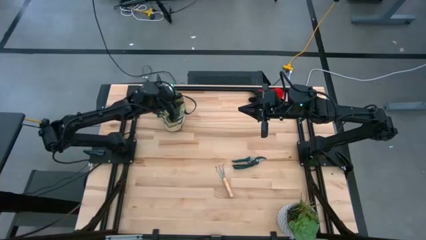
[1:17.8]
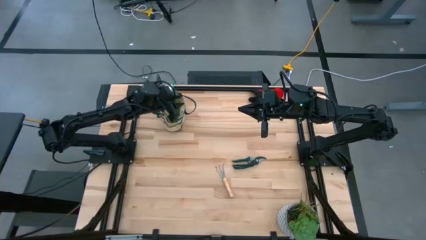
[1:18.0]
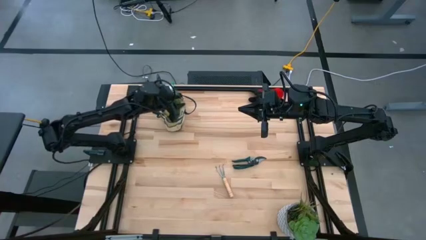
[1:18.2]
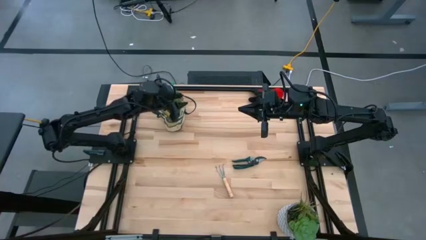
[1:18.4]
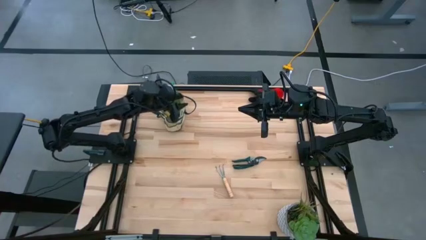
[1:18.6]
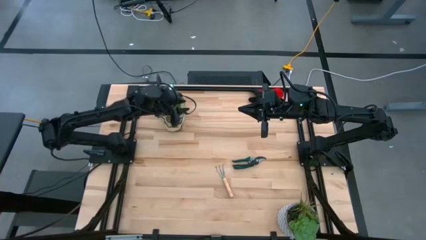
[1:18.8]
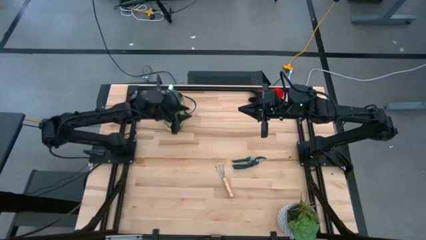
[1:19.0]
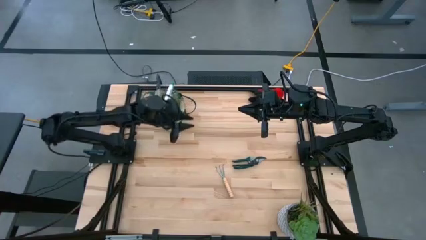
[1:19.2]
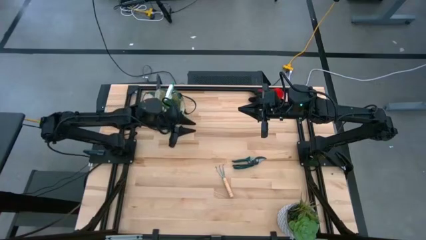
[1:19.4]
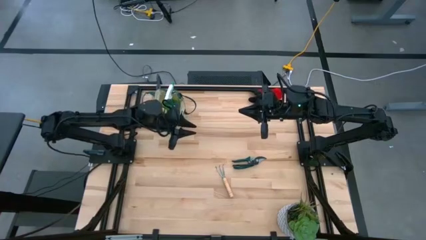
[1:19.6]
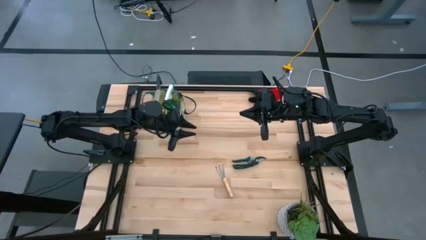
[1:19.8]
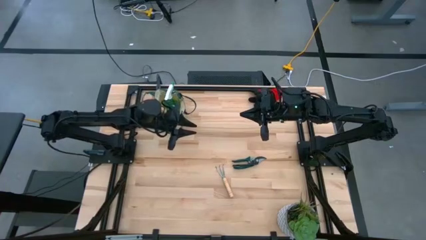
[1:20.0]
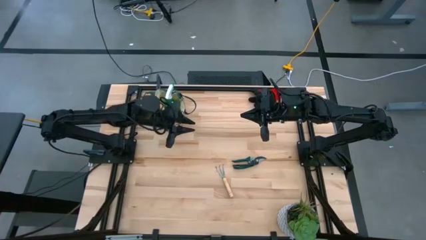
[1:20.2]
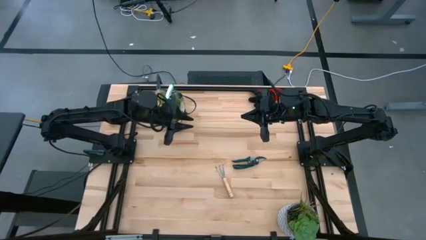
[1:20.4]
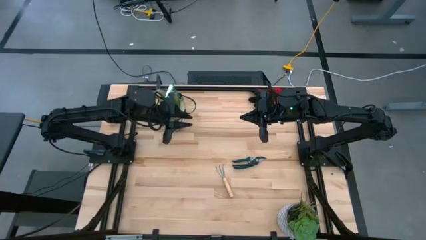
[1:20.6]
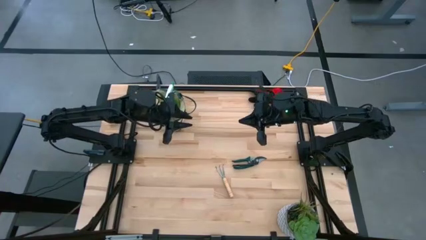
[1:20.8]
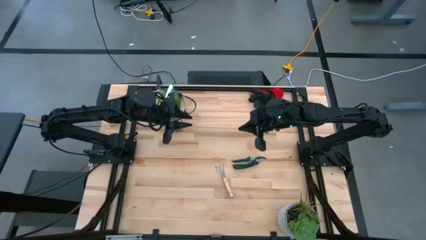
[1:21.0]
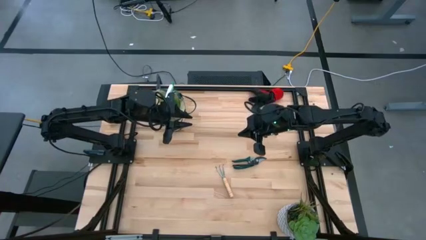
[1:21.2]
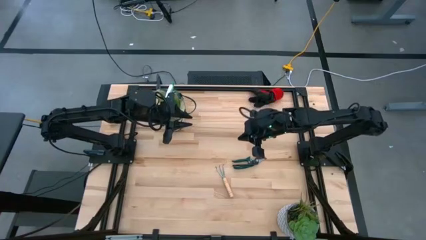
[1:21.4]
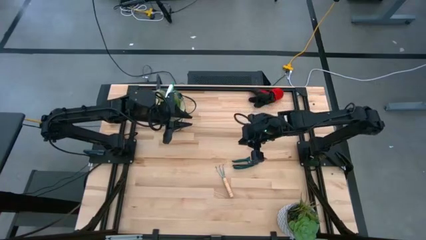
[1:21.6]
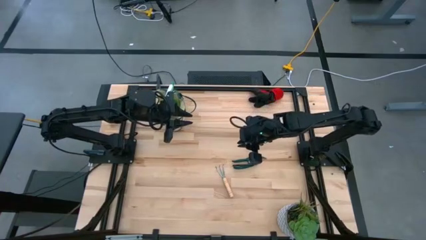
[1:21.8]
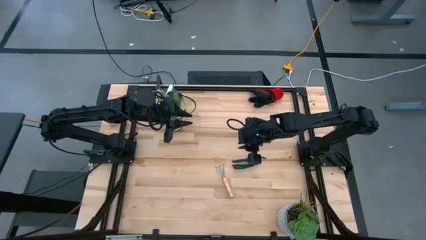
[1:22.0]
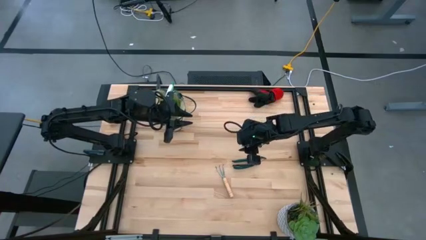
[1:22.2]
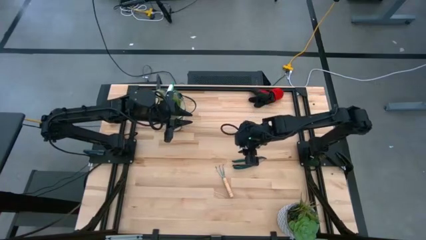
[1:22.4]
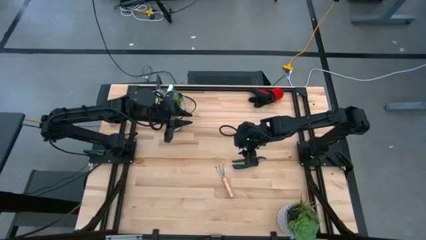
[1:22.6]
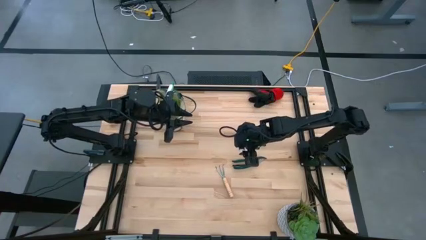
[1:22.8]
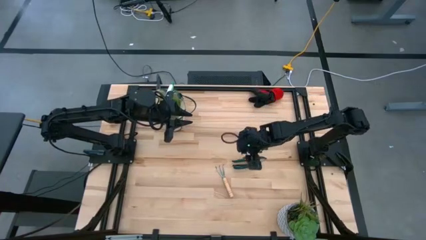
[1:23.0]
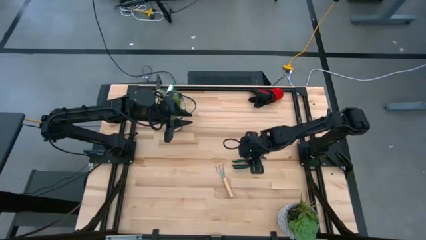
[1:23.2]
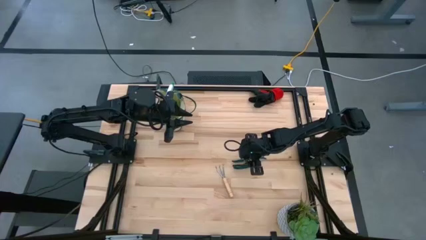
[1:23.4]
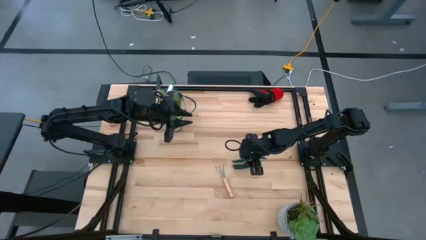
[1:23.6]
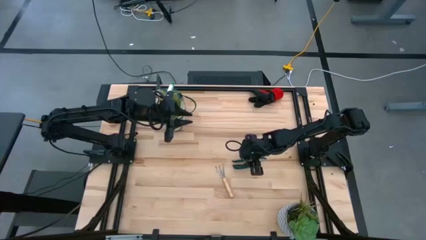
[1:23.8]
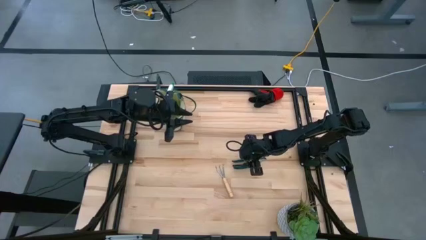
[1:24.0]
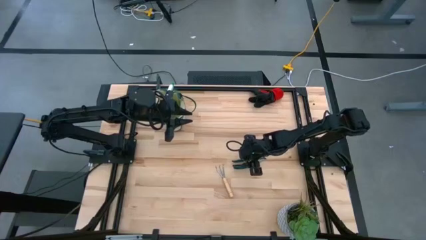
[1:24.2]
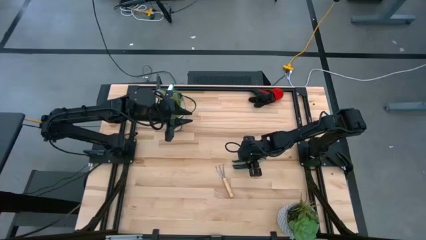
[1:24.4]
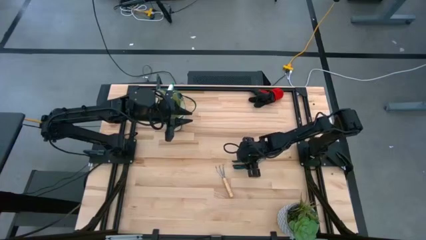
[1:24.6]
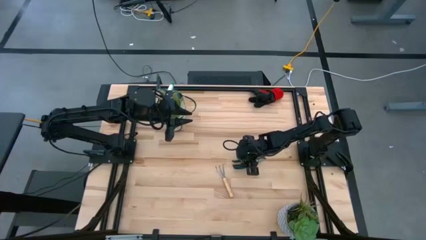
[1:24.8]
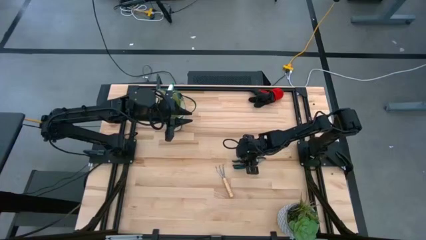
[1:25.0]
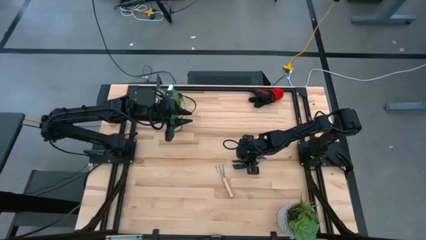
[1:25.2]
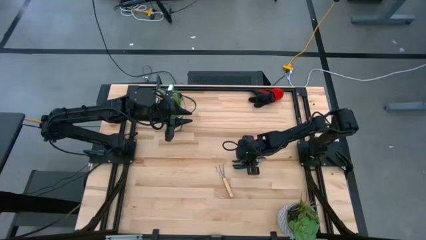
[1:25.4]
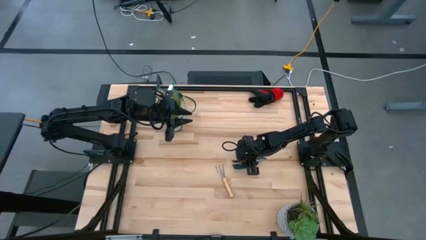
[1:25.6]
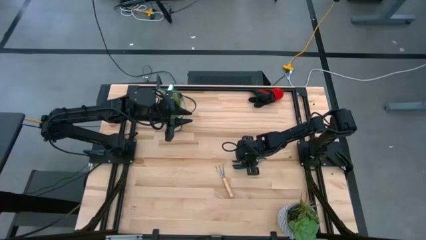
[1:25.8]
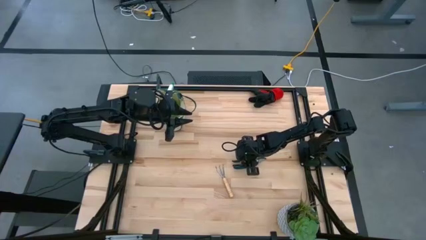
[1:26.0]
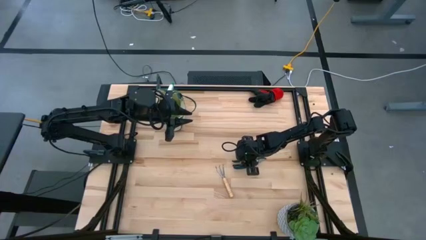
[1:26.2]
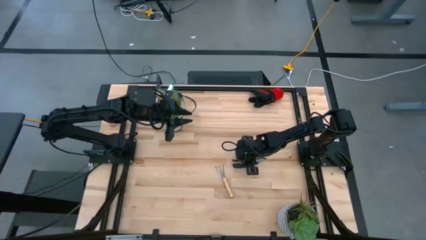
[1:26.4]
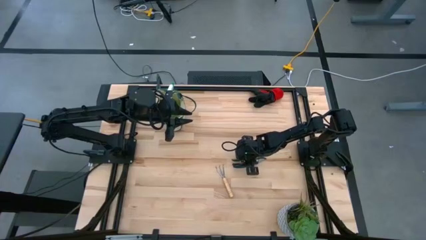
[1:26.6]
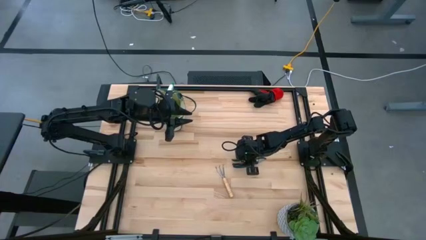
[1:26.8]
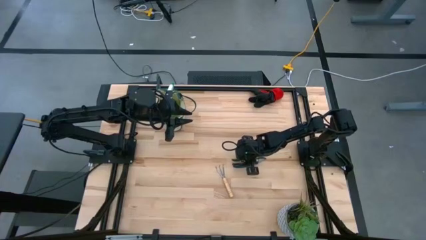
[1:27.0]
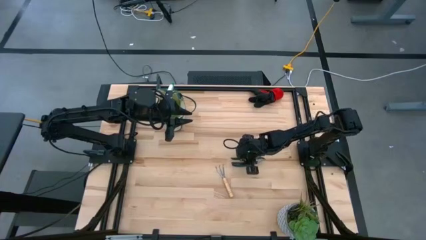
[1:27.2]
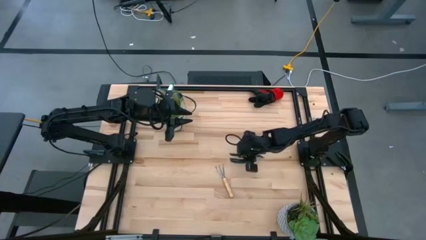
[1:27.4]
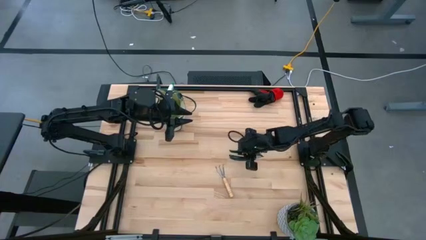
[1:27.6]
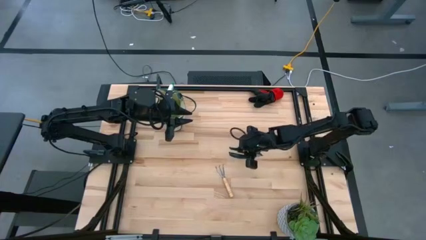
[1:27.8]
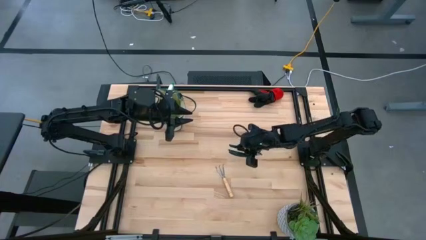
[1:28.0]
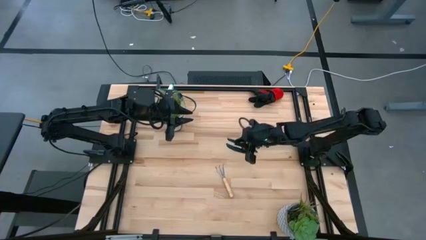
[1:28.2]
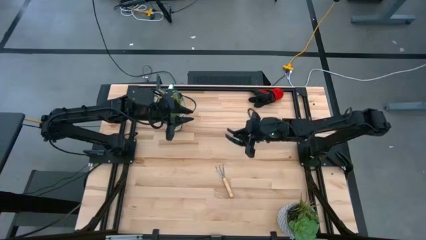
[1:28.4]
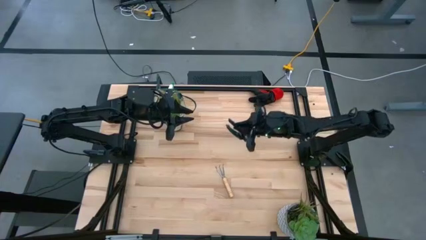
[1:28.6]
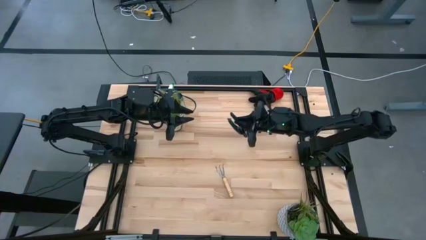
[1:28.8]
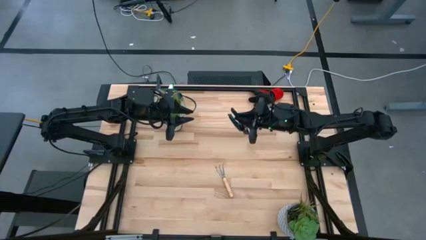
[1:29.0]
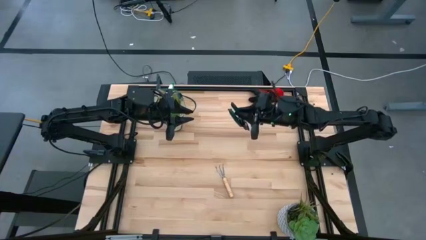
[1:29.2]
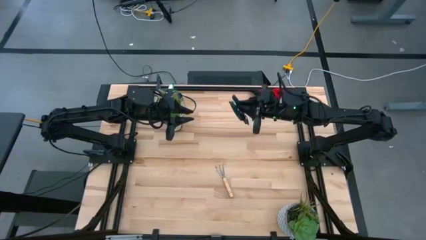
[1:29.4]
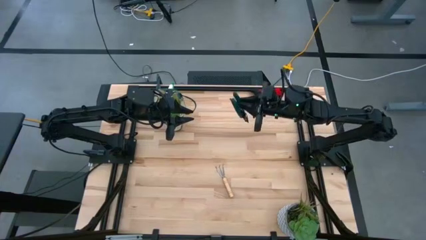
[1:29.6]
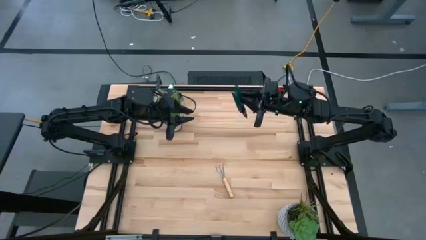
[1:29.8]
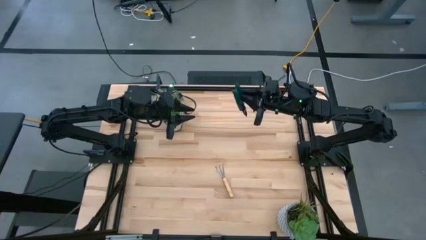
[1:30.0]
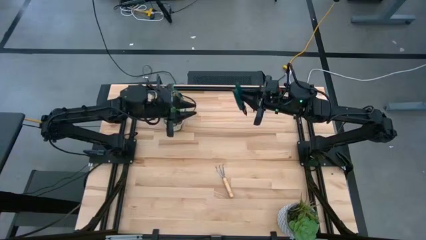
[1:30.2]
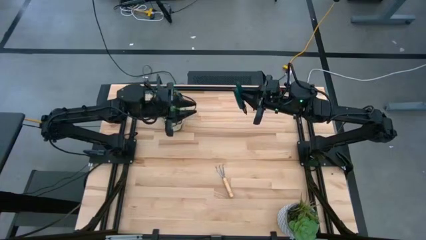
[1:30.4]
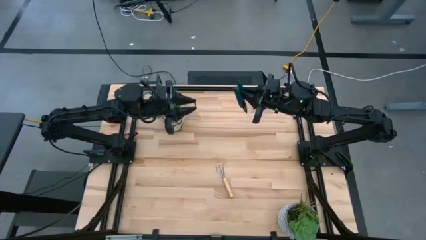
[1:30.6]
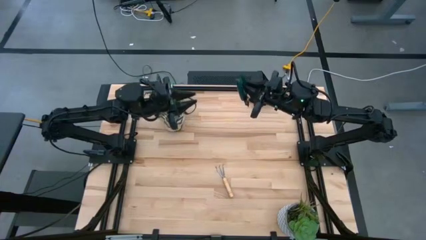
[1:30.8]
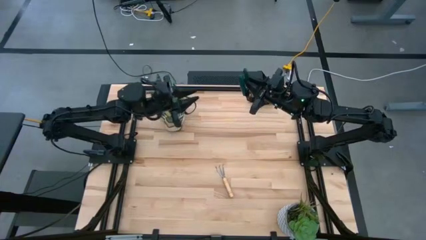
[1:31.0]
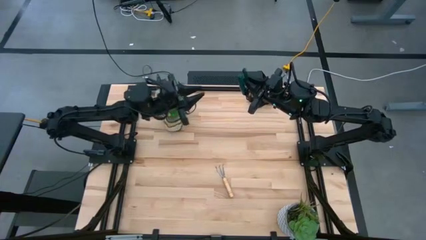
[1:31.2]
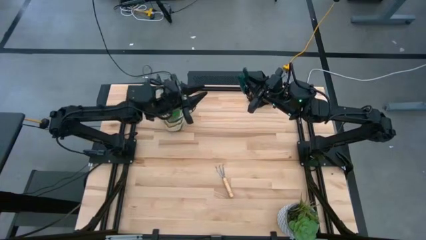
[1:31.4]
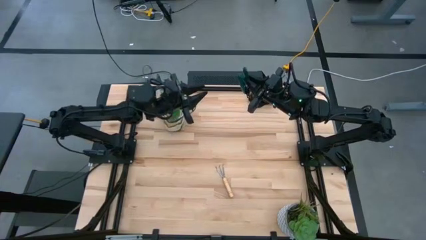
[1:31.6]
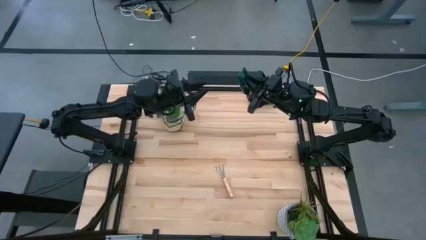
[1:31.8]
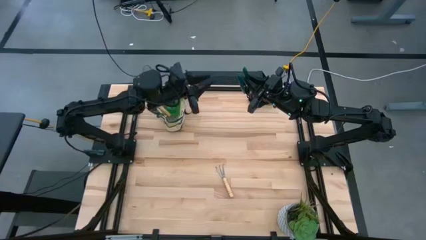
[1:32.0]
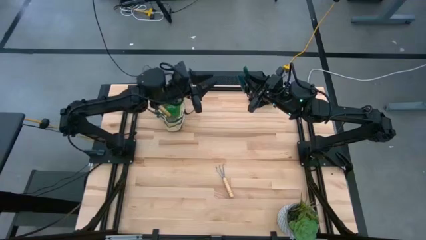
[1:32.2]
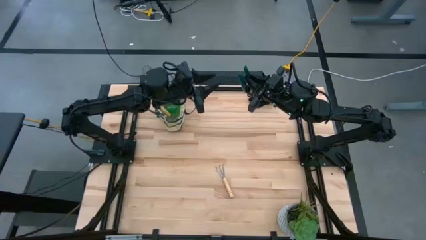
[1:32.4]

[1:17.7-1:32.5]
Task: Pick & Place Garden tools in Gardening bag
Put the dark green shears into the gardening bag
